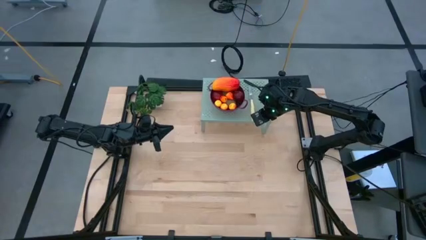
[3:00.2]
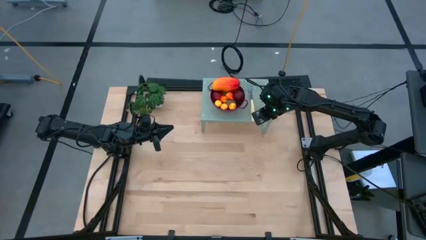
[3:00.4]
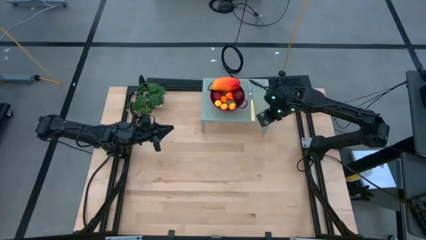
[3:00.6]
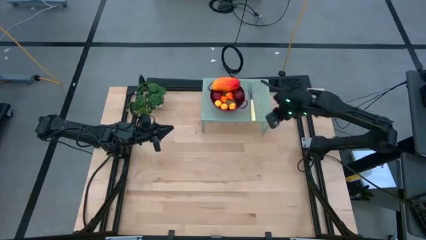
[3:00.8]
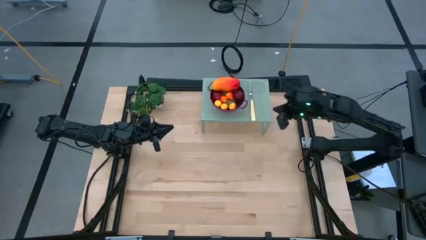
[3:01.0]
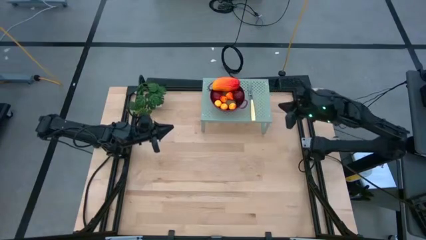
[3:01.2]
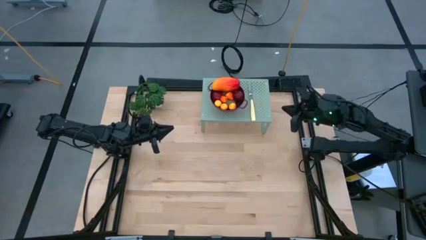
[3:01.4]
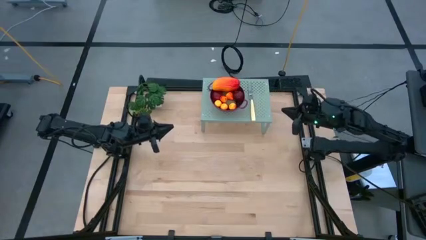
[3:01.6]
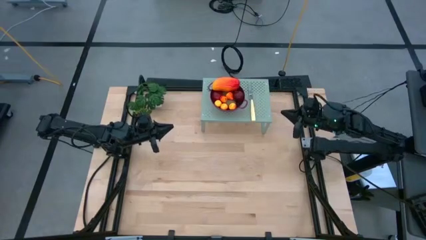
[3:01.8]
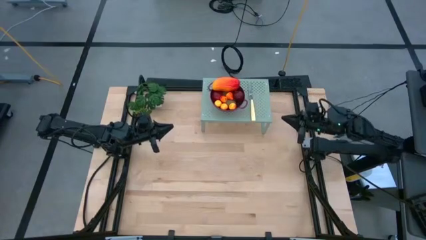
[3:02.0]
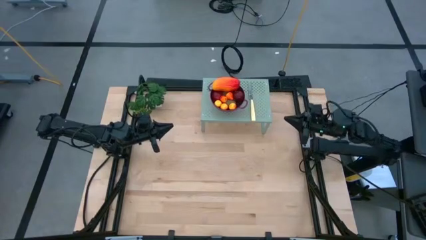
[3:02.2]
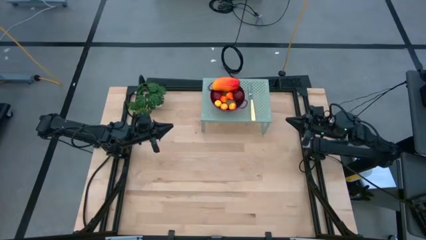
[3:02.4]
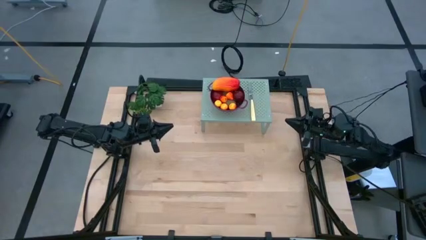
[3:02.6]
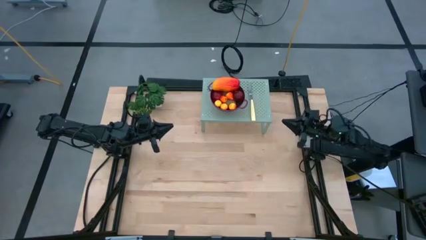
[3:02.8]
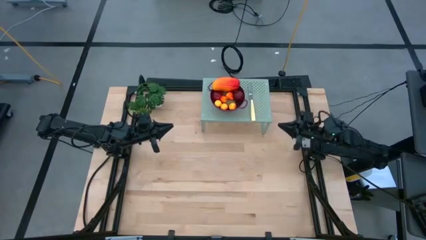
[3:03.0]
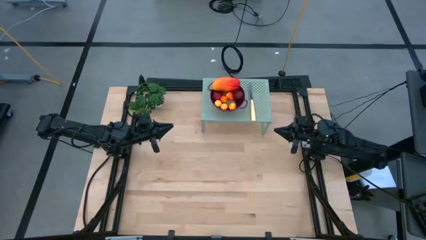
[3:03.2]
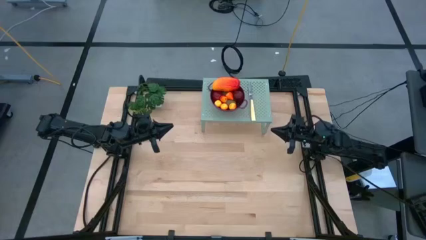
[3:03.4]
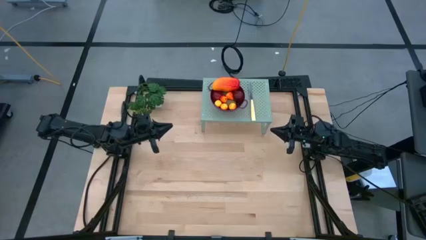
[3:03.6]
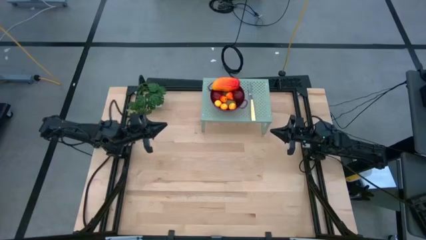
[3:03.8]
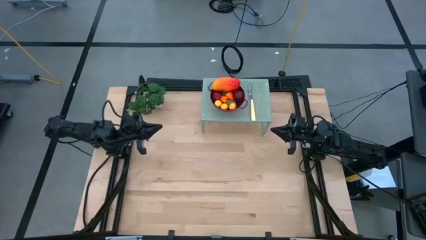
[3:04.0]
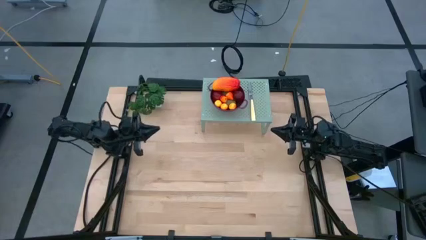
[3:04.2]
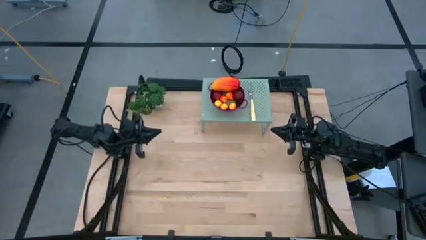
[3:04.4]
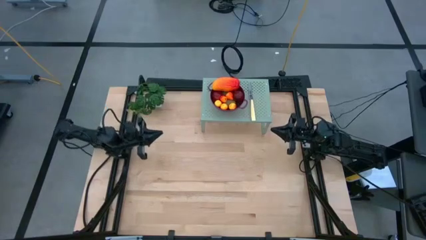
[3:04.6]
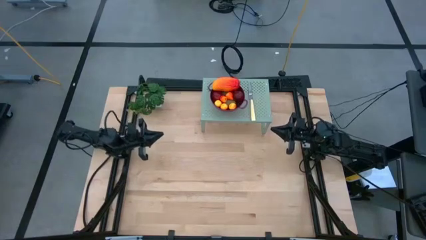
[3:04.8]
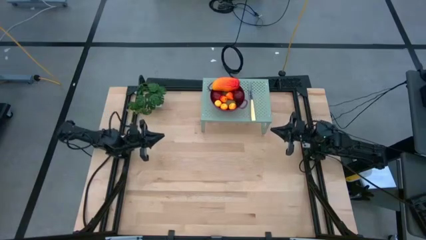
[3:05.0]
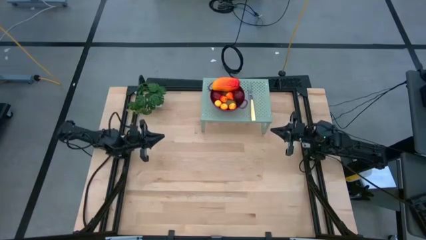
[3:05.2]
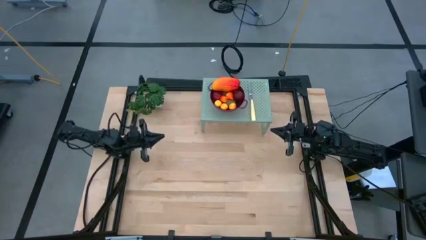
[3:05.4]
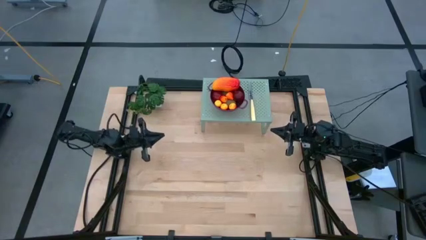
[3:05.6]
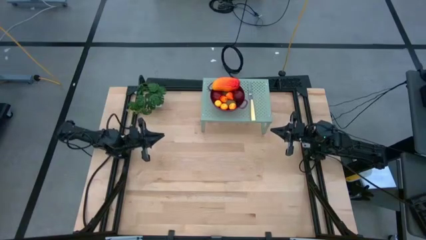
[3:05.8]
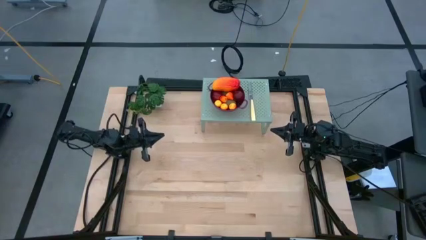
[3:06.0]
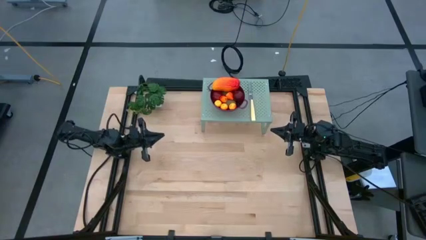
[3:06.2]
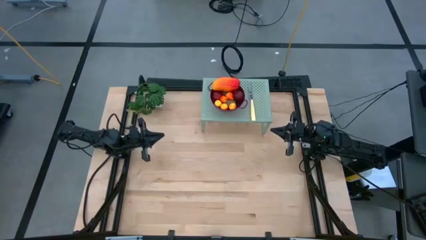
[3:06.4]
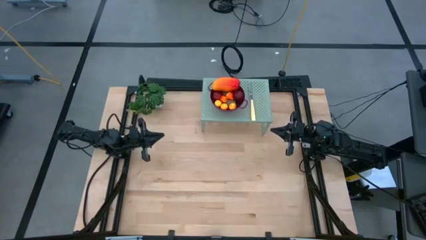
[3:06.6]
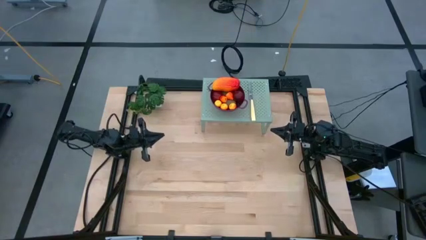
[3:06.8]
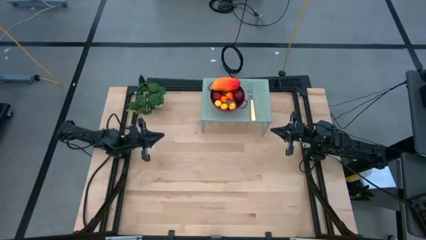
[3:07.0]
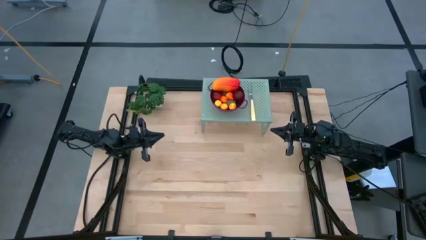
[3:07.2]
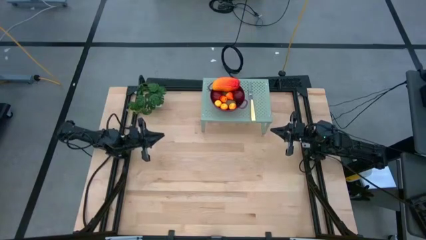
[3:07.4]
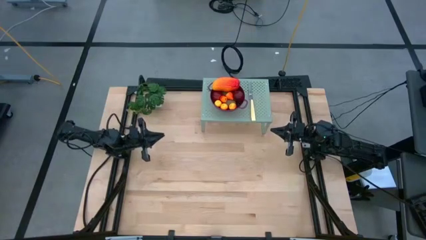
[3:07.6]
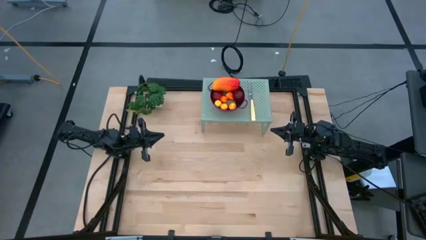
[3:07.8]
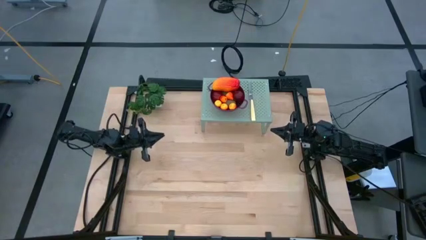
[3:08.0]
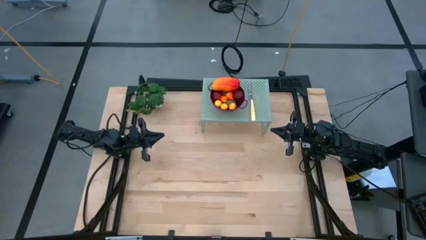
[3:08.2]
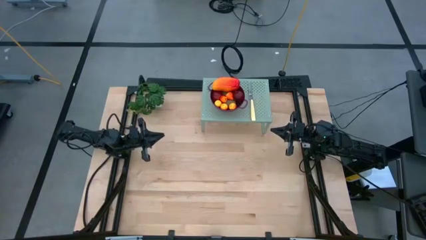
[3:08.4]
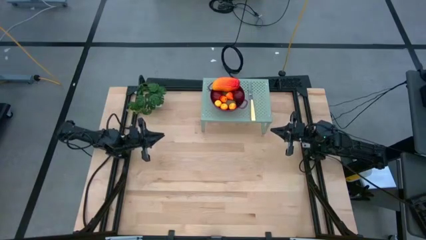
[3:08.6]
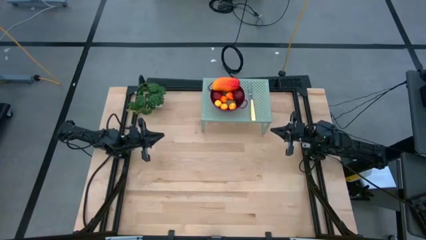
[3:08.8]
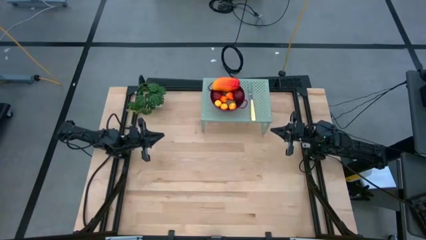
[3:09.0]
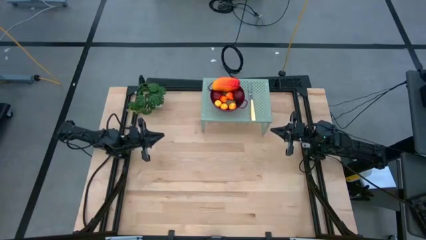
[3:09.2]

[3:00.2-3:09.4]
Task: Pick & Place Fruit
Return to home position

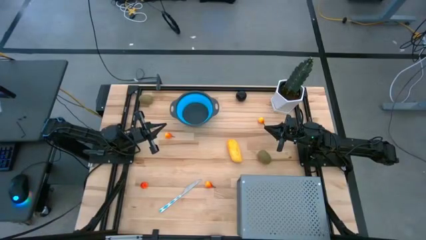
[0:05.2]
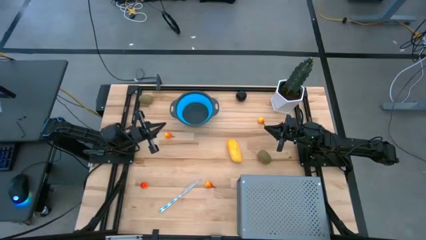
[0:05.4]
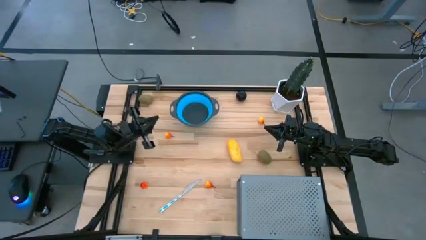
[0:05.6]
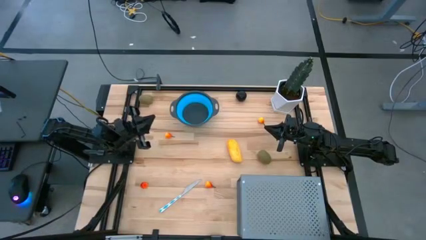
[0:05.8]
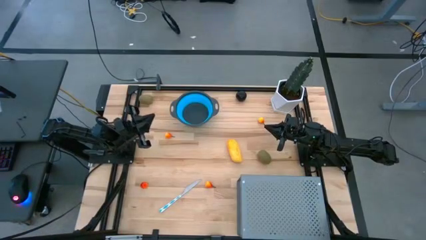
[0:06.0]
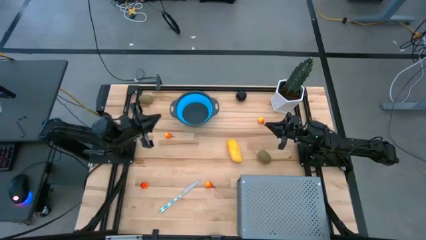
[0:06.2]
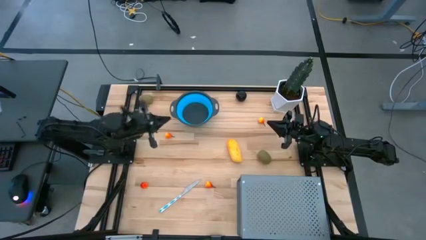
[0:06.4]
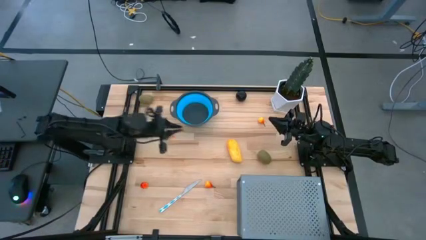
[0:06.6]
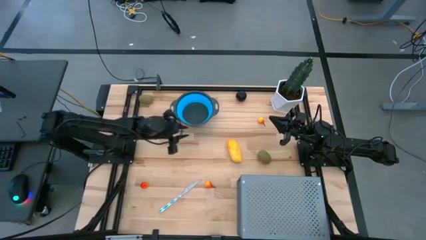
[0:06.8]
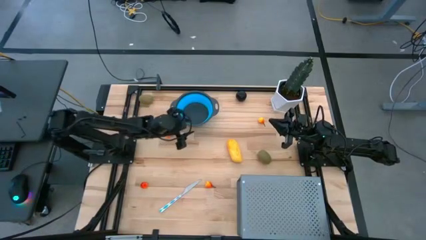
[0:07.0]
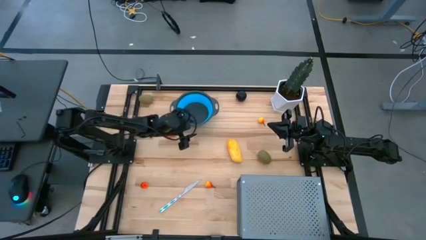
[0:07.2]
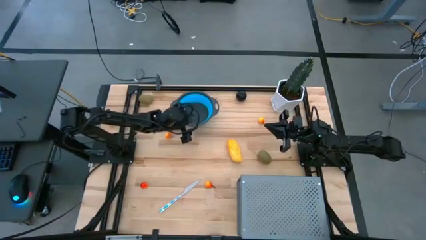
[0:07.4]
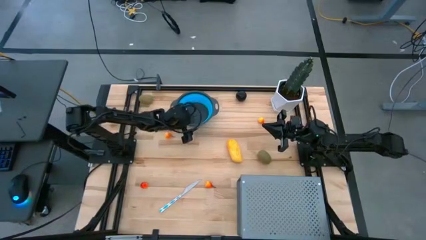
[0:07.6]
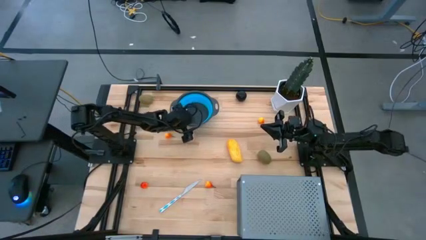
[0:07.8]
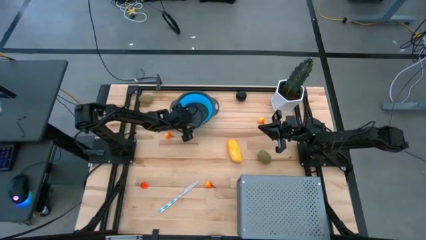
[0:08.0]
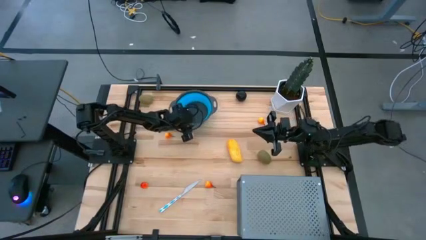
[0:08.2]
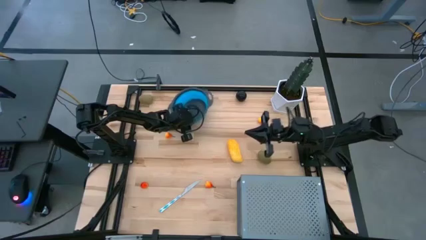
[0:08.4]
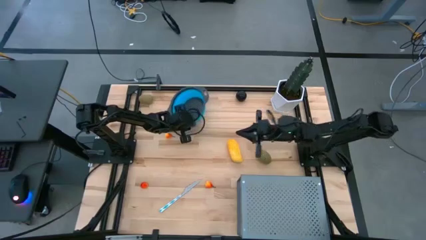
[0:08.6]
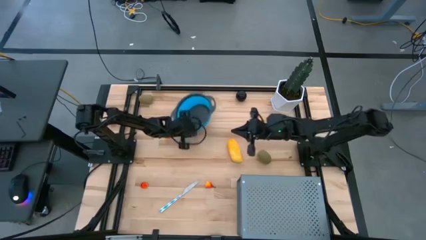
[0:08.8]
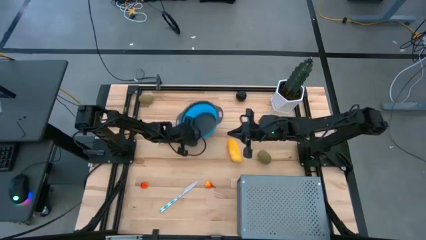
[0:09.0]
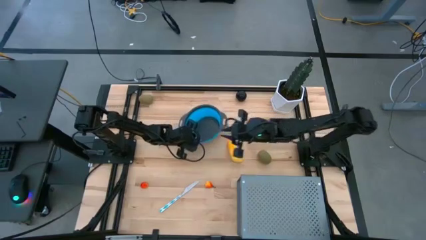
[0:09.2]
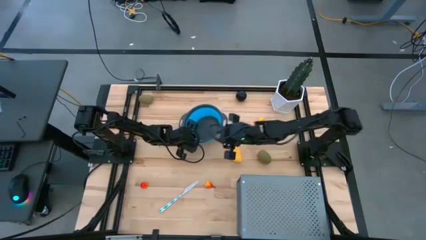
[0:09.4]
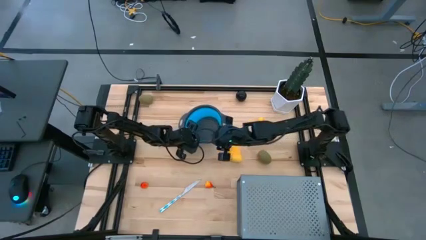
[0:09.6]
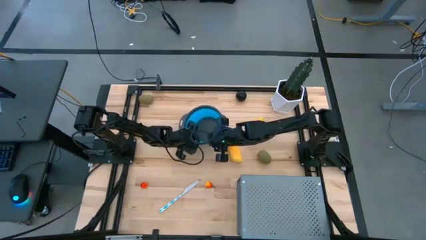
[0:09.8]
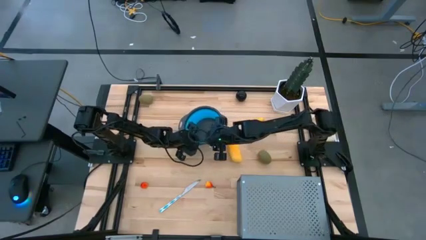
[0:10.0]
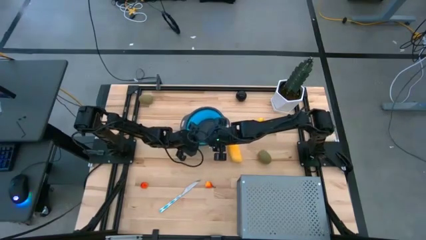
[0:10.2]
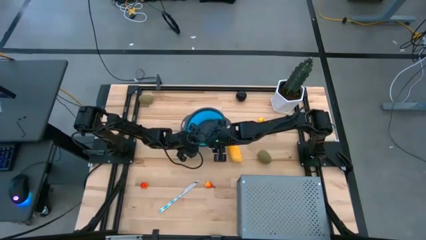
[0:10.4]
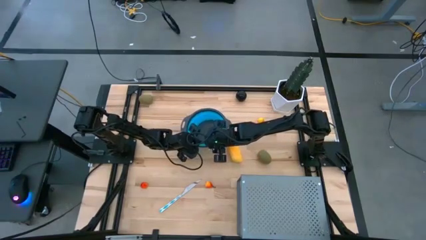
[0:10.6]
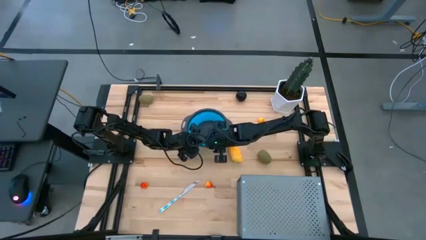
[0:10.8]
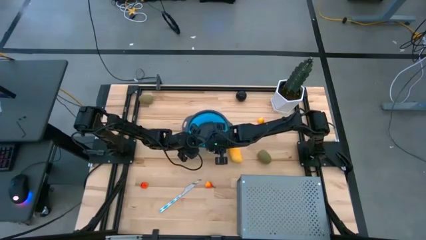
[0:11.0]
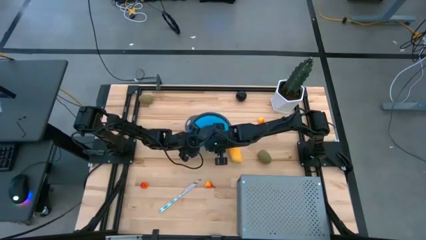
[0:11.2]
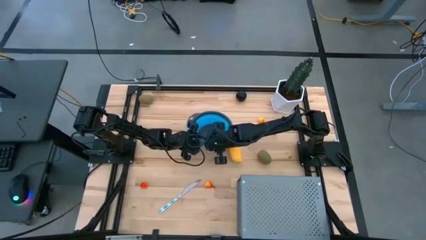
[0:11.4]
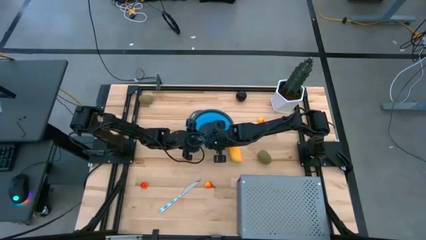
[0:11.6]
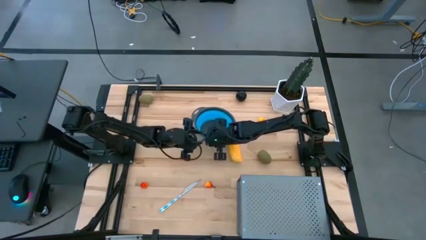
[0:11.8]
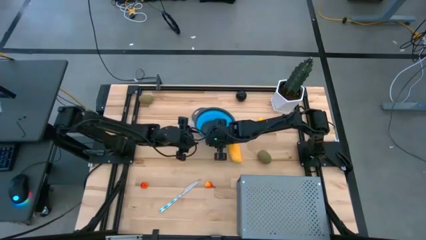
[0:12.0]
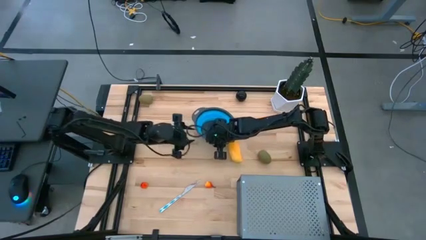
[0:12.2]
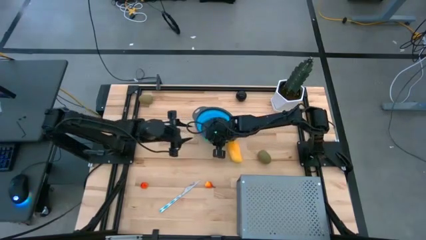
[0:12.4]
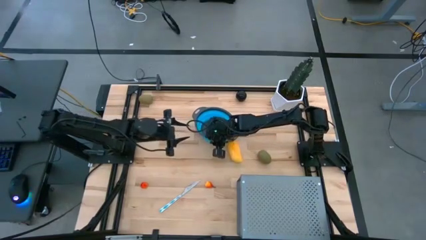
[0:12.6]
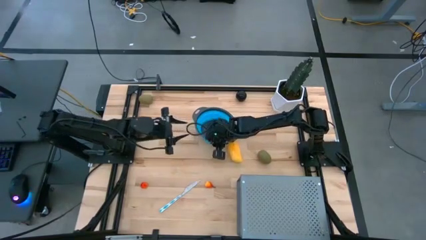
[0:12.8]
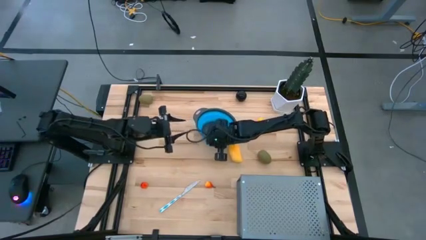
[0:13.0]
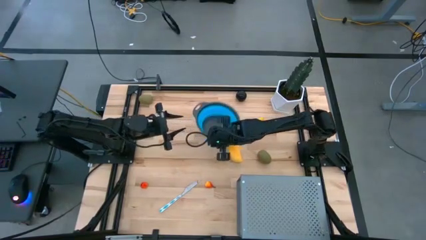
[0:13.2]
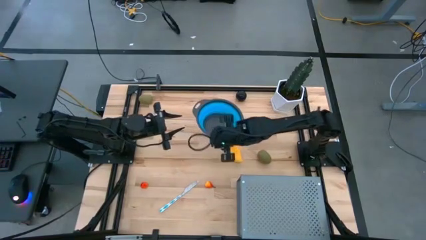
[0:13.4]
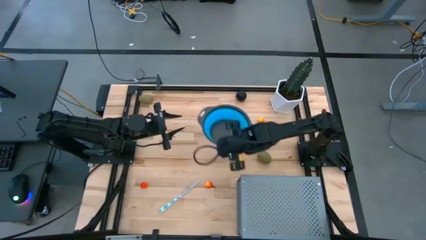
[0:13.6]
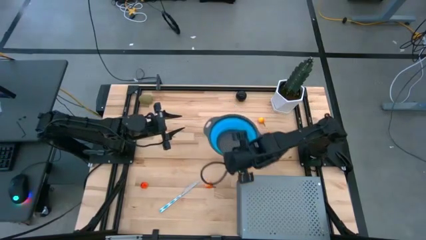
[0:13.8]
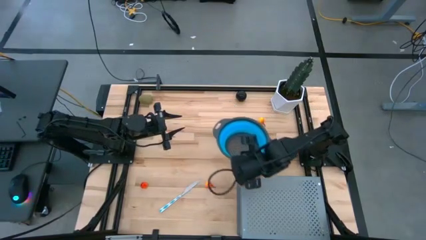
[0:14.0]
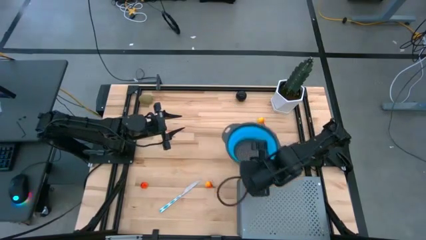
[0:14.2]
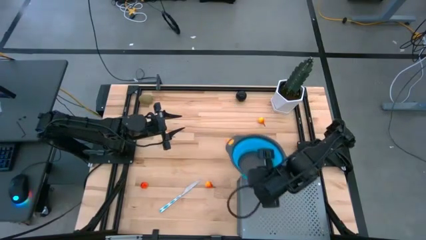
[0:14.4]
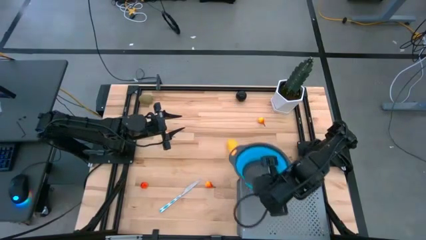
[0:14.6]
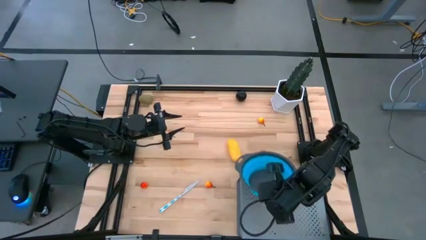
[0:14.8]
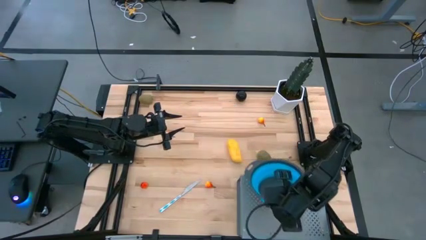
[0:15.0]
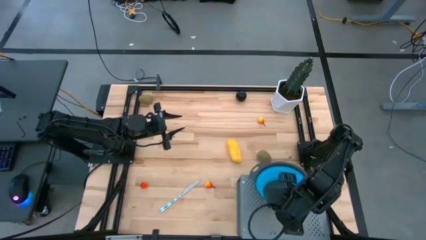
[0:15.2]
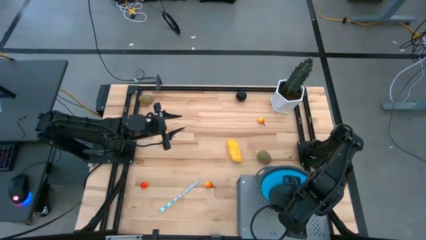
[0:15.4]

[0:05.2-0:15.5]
Task: Pick & Place Fruit
Put the blue strainer bowl on the shelf
